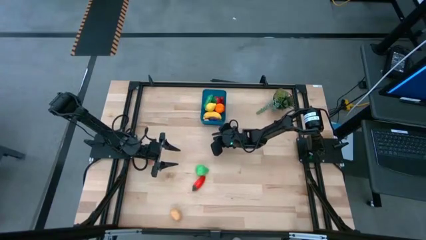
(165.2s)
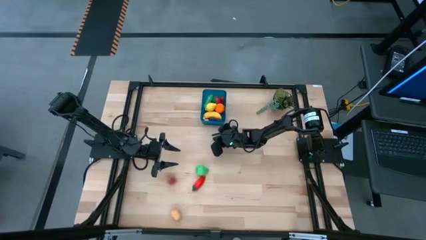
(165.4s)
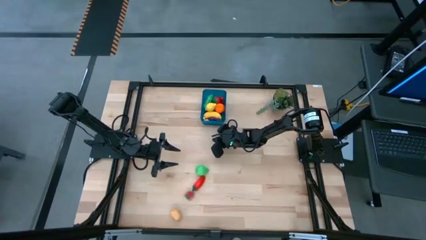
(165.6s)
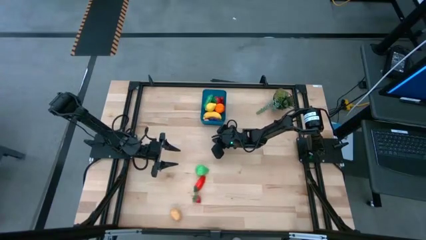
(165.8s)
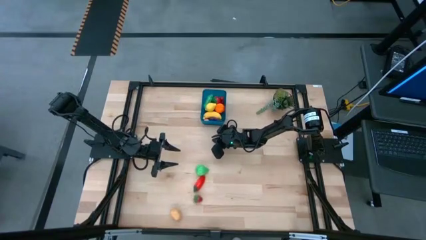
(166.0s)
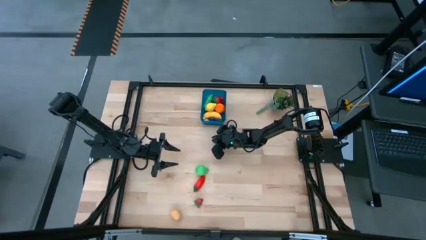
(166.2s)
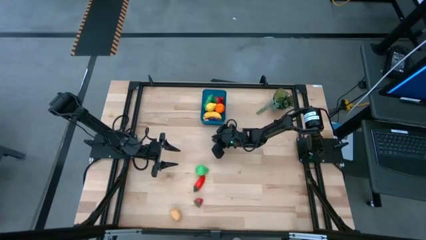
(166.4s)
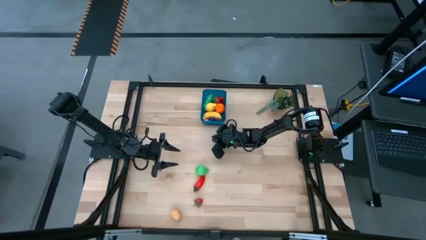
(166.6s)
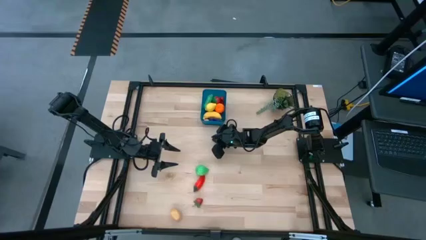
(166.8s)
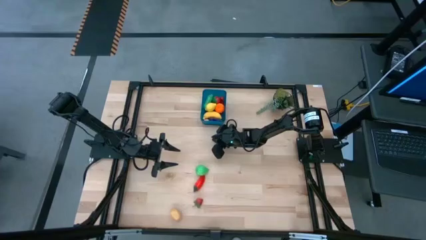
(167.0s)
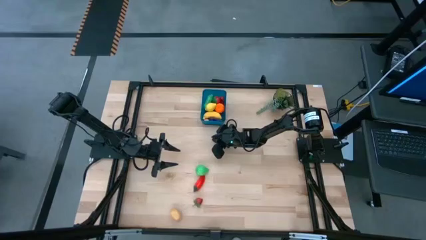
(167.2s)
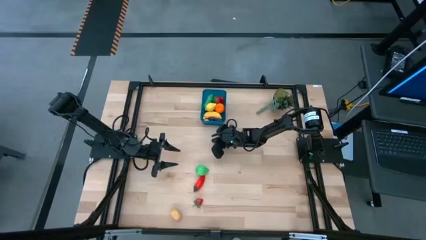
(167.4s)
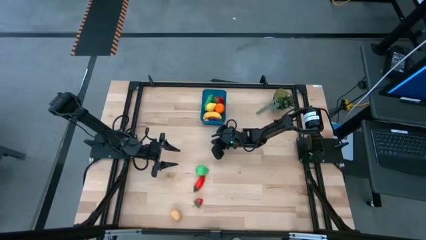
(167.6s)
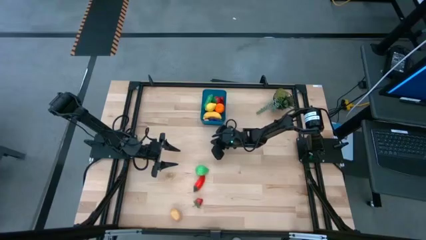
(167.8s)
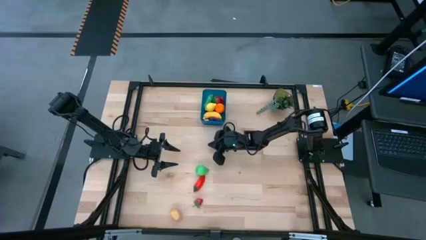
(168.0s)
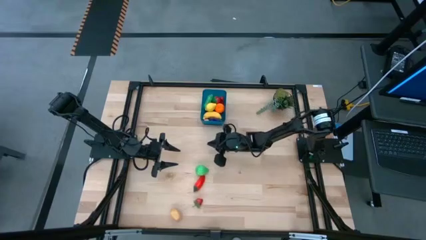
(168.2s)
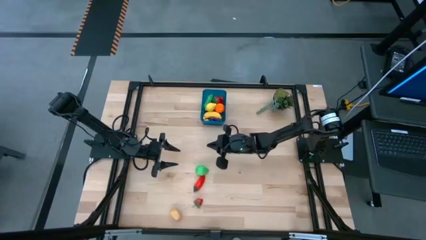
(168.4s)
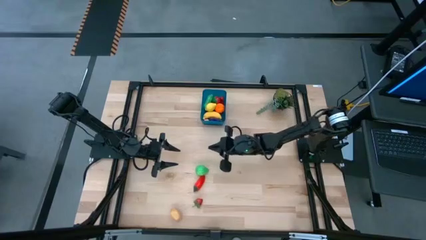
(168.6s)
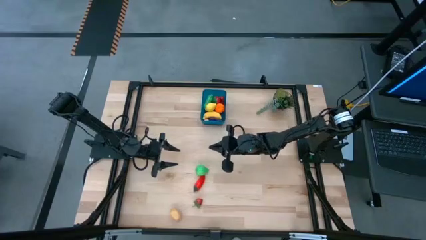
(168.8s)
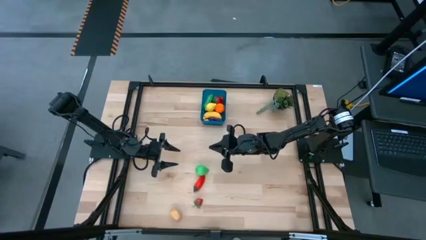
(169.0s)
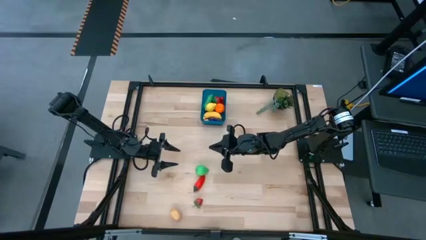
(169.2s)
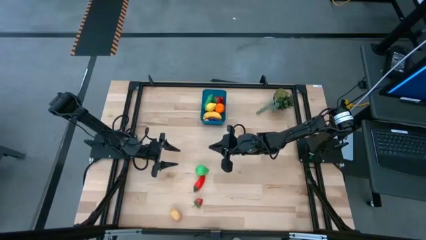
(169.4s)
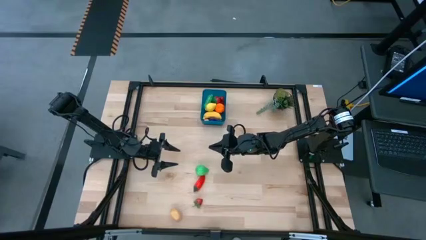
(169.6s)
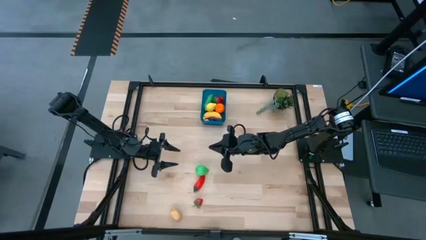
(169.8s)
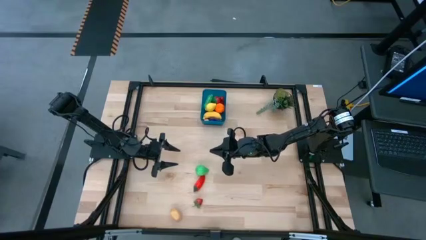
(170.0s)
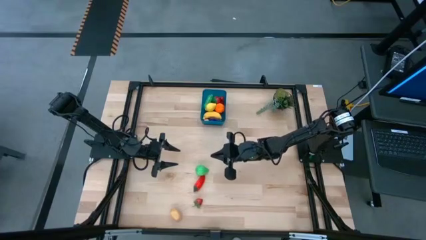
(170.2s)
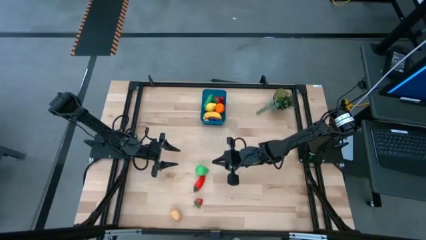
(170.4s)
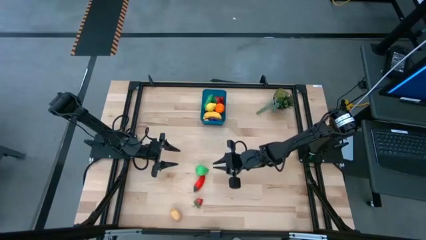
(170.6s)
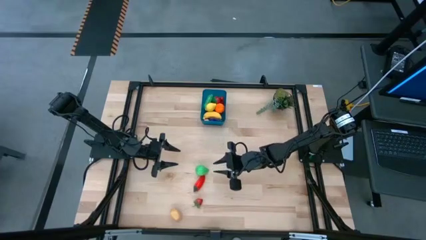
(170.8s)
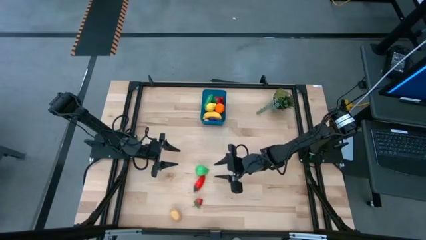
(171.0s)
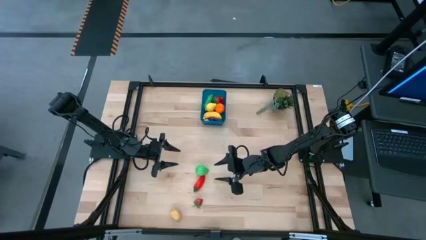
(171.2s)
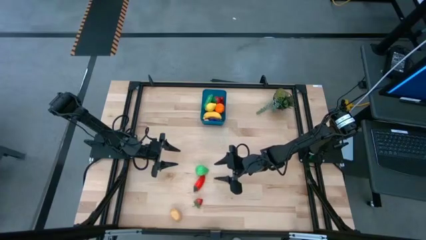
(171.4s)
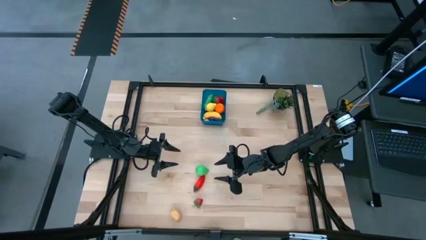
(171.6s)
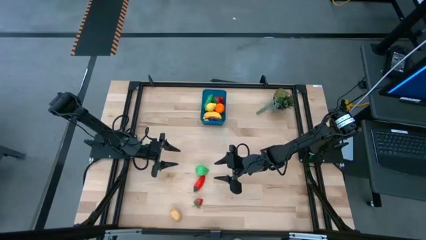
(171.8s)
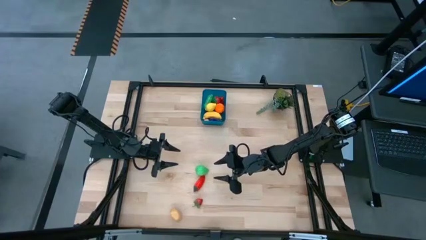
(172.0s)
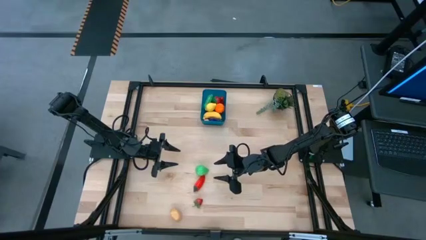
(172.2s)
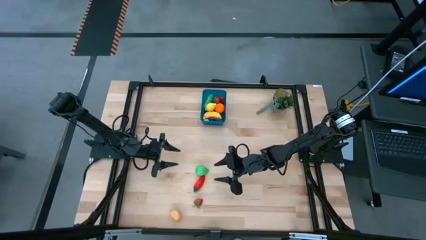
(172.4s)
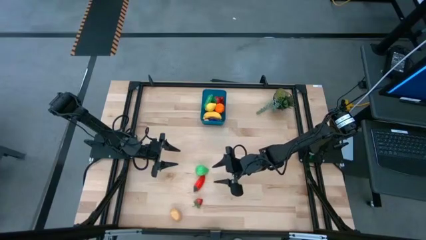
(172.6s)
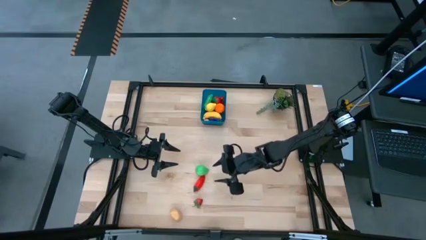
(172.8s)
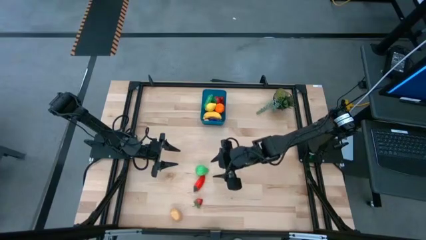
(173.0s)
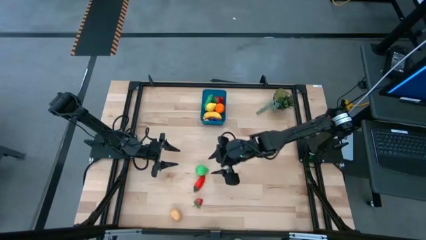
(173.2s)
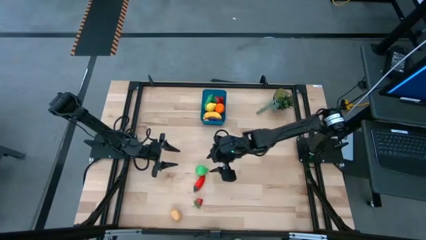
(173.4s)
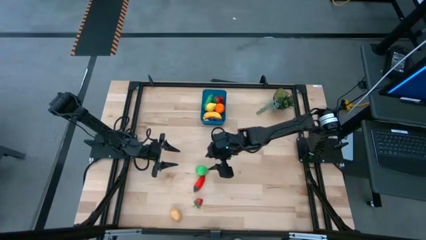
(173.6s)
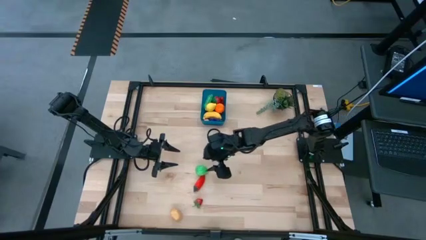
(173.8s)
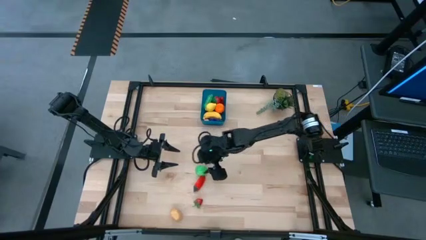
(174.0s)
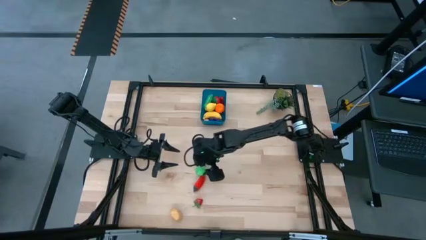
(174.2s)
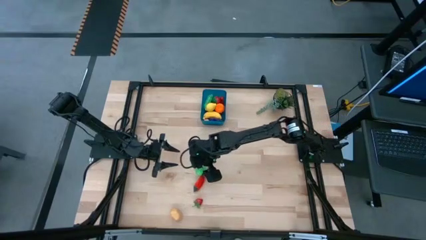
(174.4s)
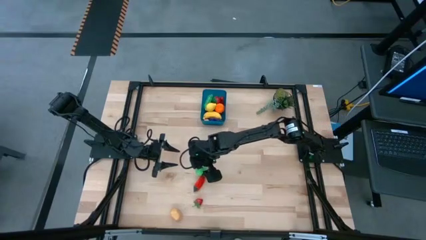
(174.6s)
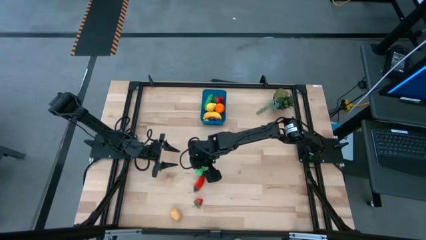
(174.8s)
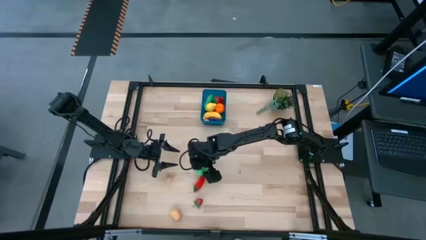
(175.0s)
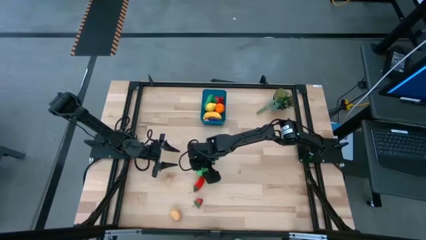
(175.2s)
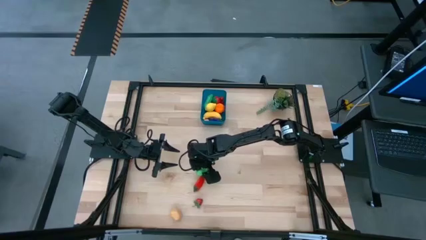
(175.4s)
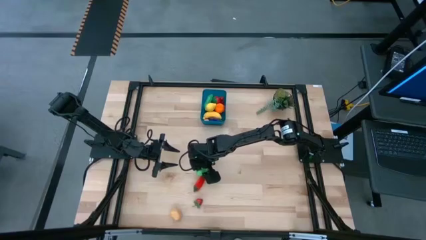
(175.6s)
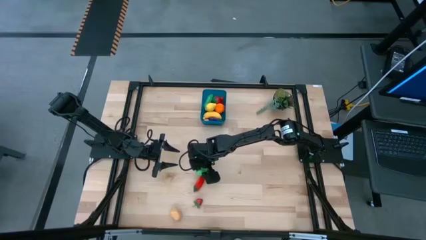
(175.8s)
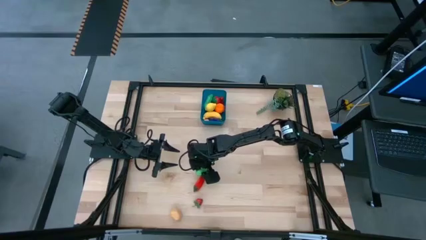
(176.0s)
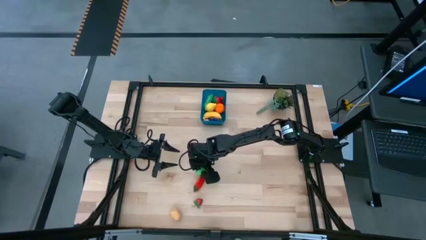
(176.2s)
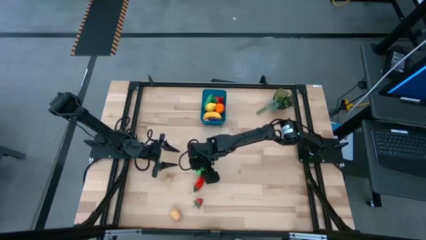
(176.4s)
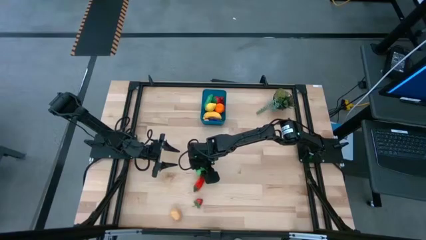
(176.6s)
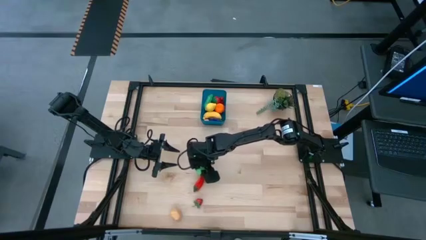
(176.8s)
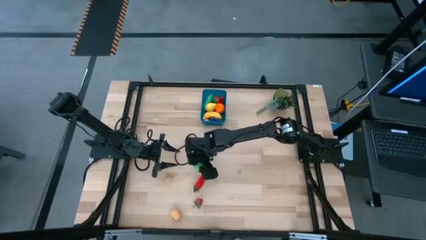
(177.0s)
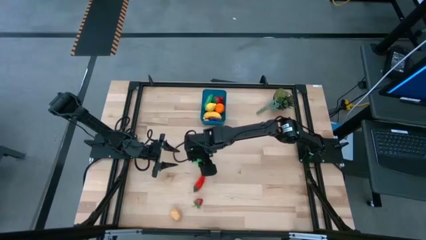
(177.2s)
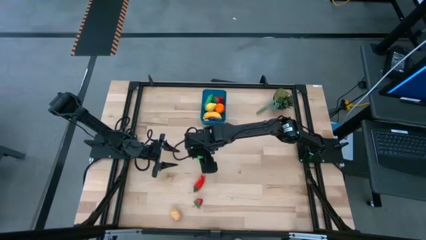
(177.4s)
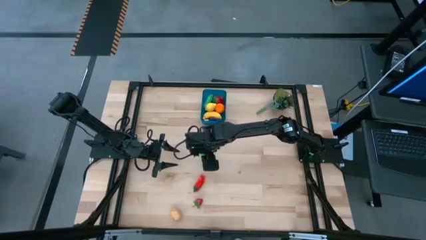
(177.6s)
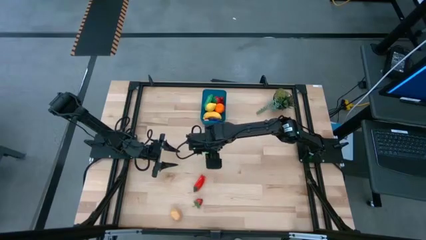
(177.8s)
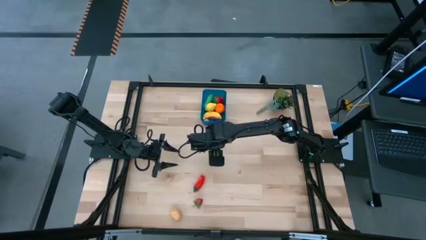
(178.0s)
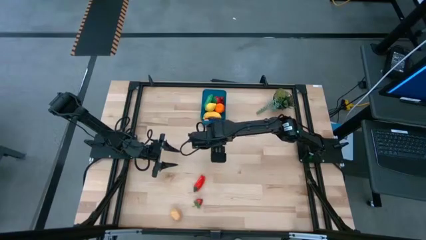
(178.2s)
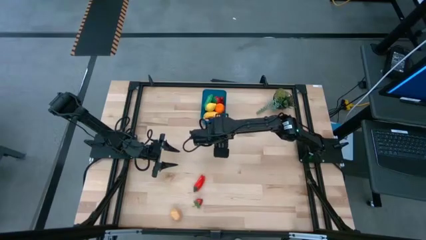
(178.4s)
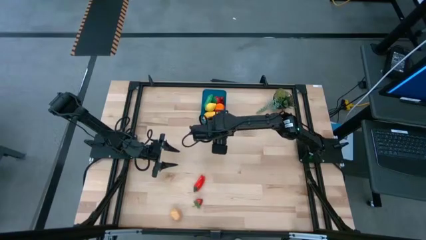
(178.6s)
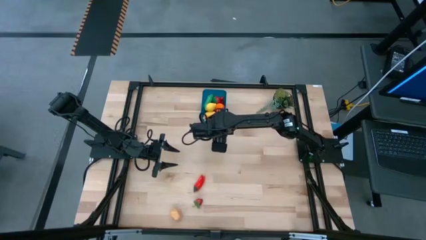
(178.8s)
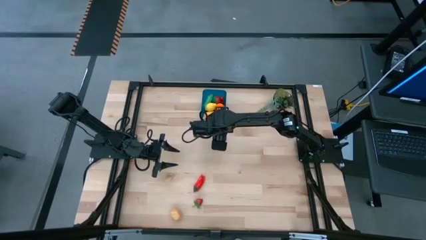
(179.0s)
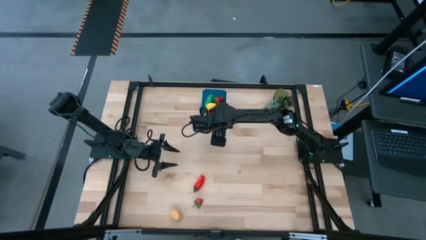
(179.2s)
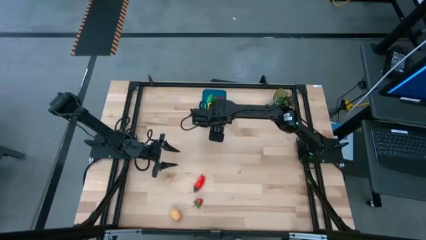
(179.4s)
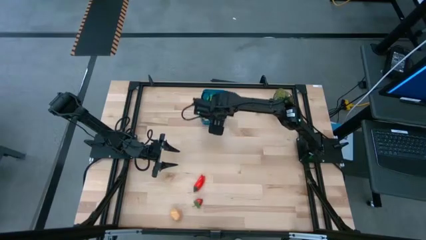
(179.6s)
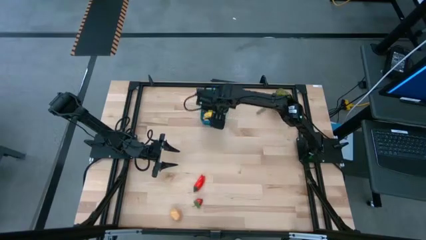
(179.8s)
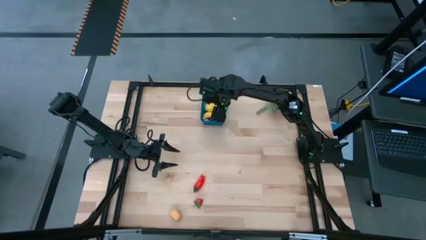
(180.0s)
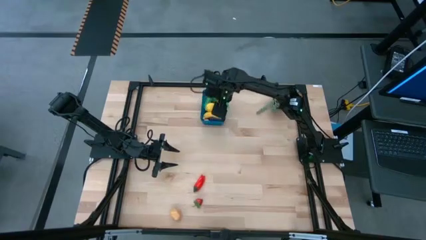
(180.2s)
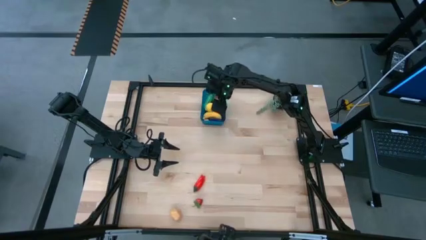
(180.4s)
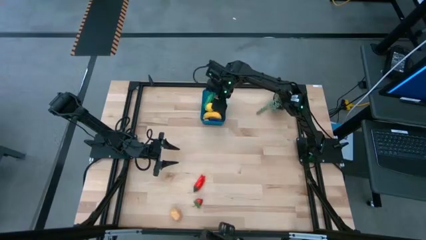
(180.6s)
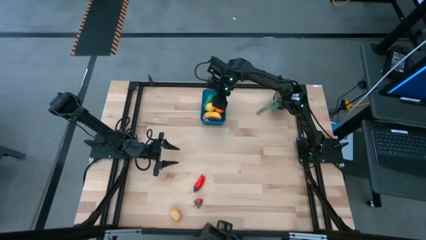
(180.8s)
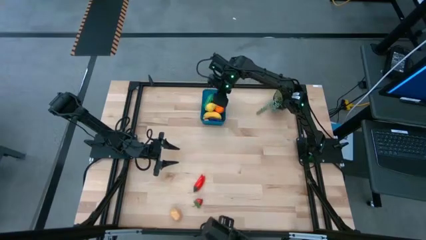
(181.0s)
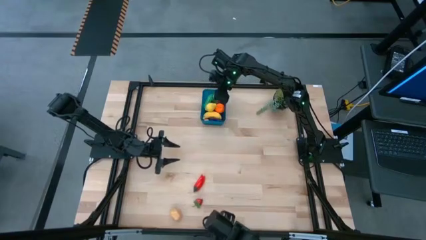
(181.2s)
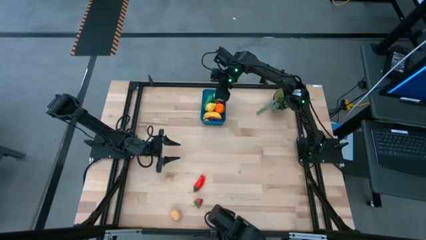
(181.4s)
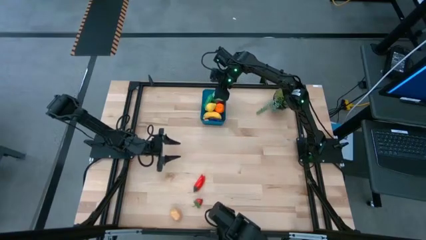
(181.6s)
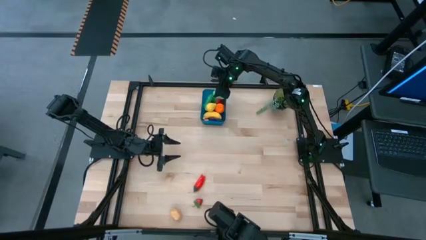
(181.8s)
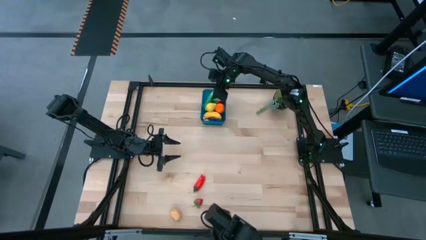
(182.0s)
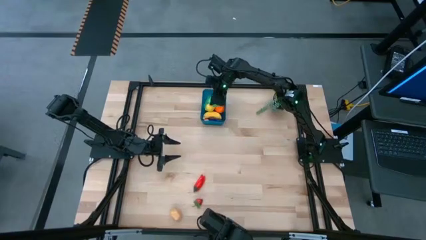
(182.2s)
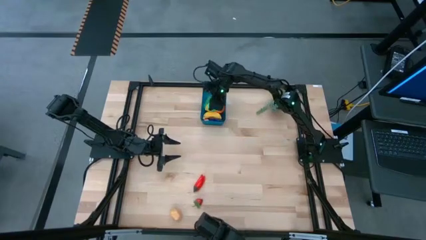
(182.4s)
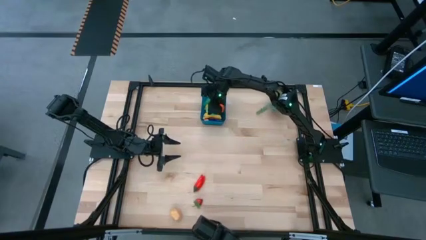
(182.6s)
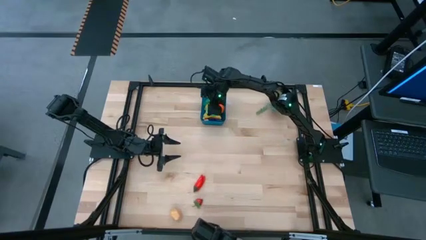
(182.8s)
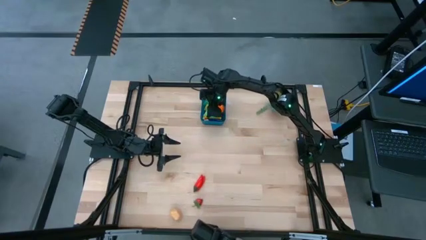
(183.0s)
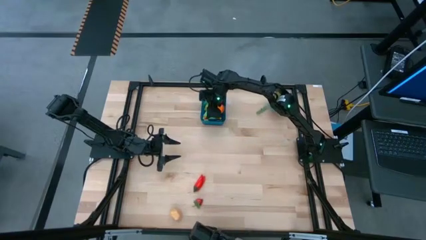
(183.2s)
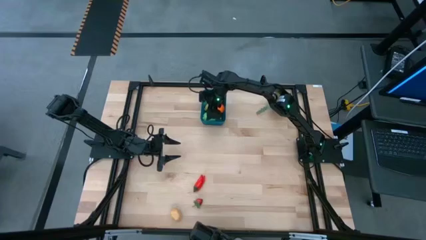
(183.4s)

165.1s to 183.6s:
Task: Pick and placing Produce into tupperware
Put the pear into the blue bin
